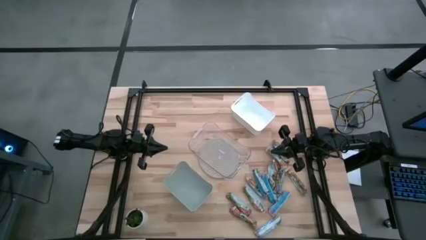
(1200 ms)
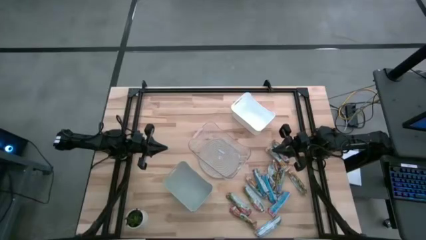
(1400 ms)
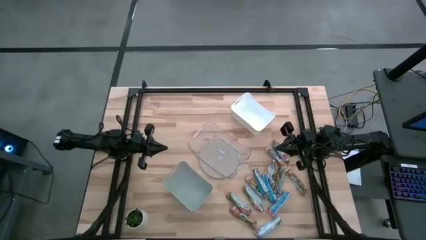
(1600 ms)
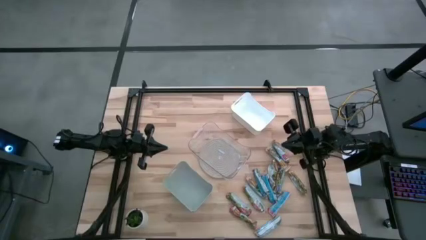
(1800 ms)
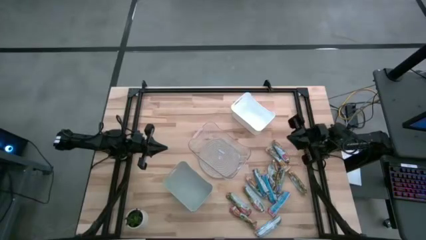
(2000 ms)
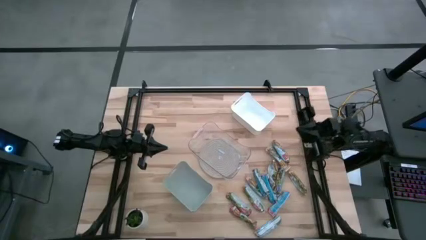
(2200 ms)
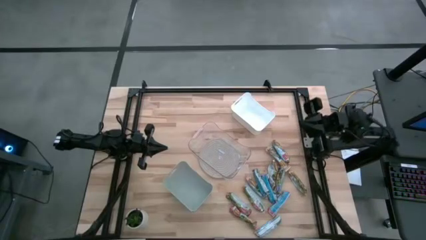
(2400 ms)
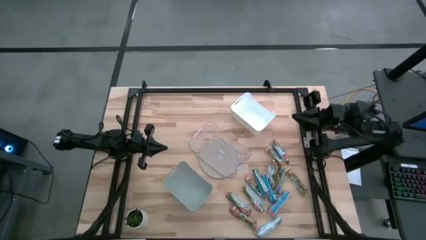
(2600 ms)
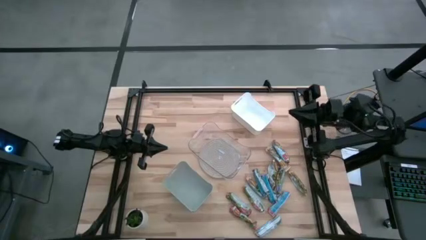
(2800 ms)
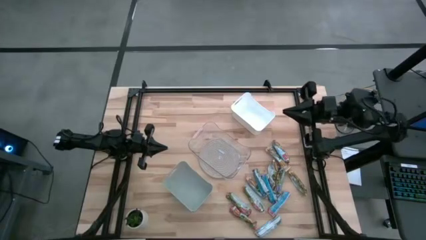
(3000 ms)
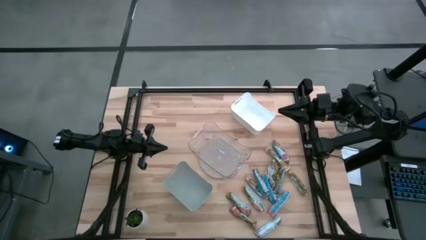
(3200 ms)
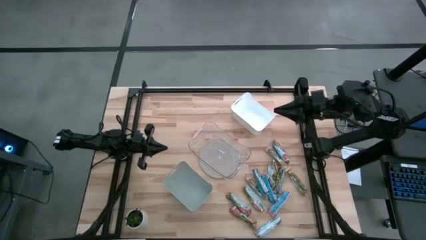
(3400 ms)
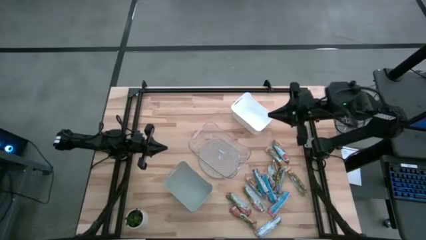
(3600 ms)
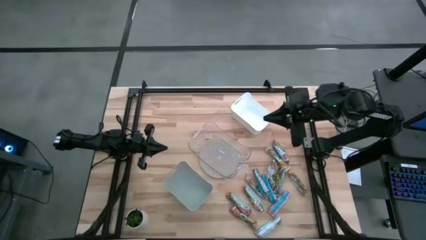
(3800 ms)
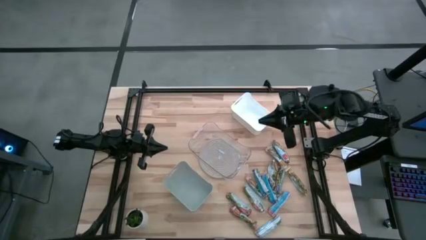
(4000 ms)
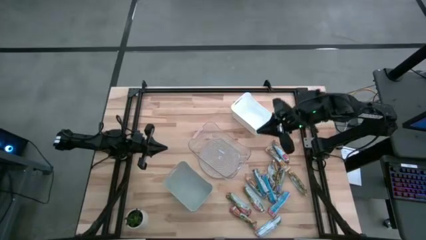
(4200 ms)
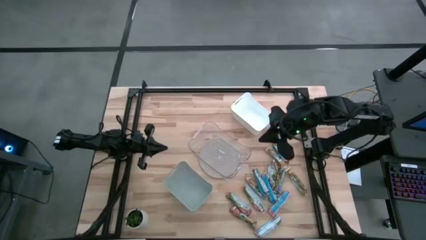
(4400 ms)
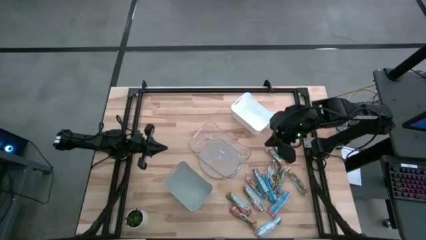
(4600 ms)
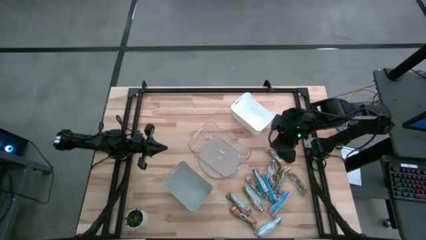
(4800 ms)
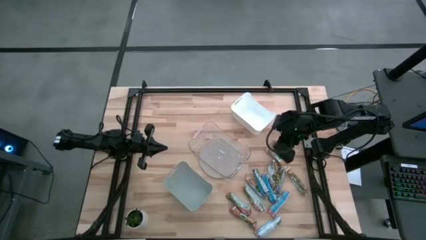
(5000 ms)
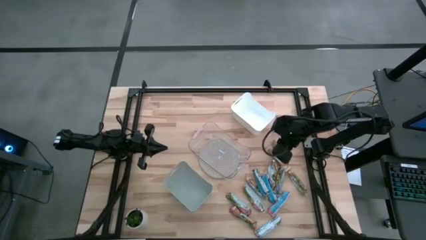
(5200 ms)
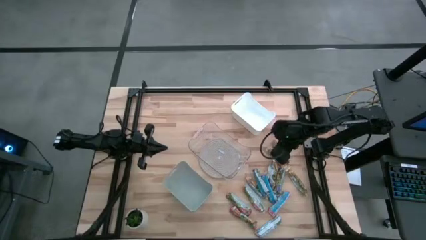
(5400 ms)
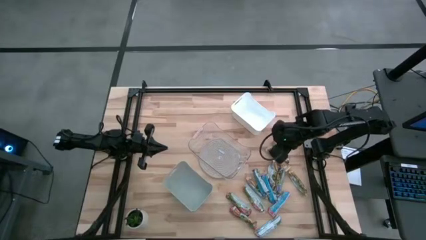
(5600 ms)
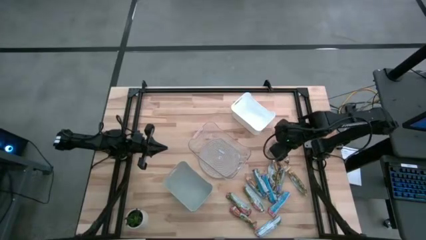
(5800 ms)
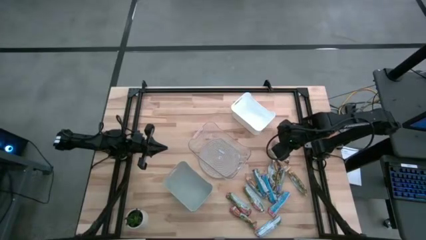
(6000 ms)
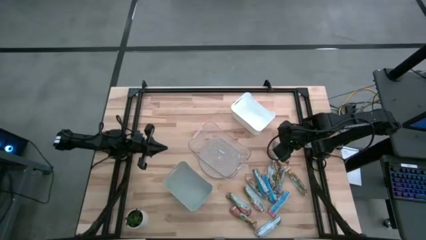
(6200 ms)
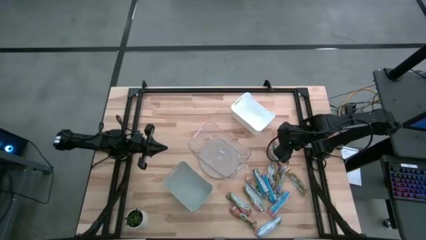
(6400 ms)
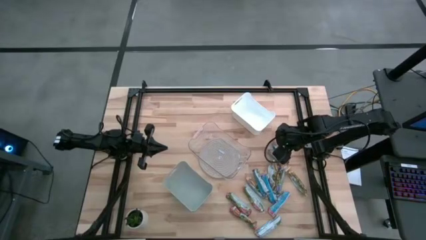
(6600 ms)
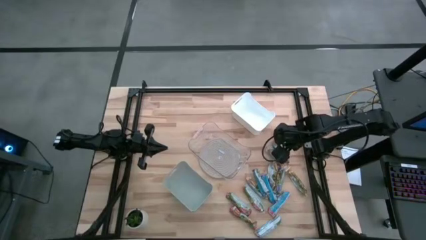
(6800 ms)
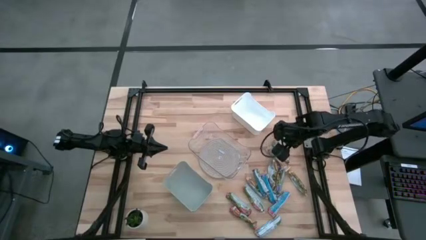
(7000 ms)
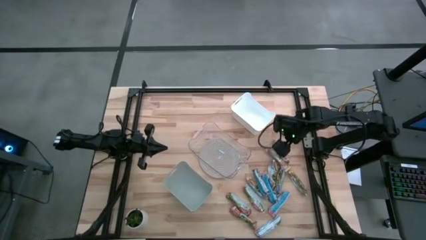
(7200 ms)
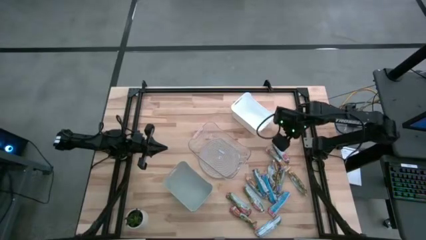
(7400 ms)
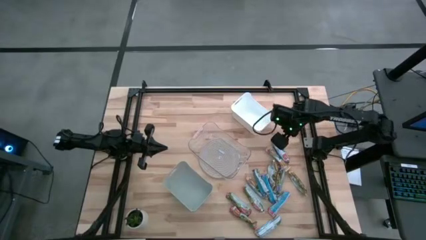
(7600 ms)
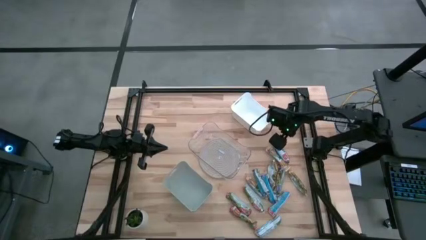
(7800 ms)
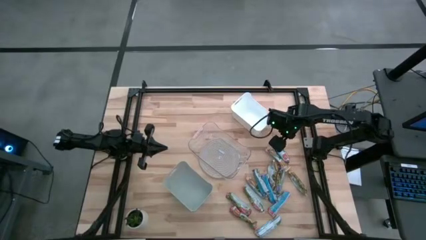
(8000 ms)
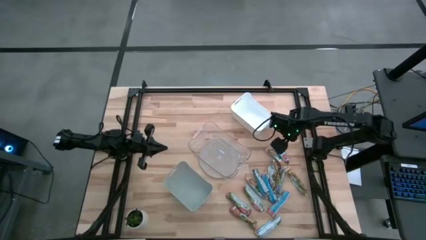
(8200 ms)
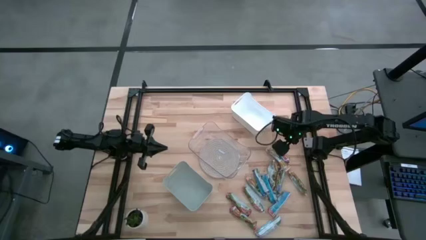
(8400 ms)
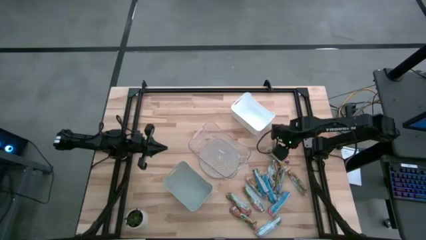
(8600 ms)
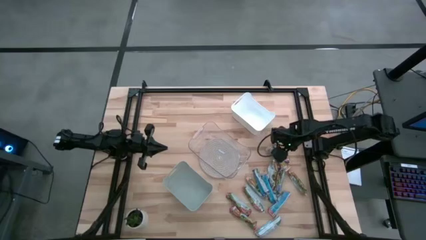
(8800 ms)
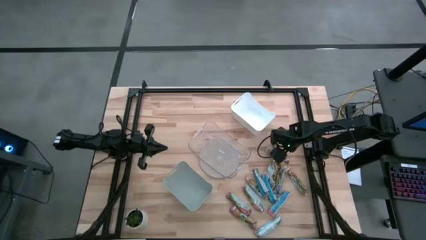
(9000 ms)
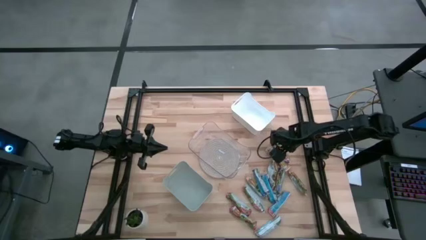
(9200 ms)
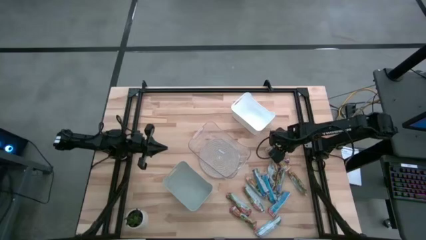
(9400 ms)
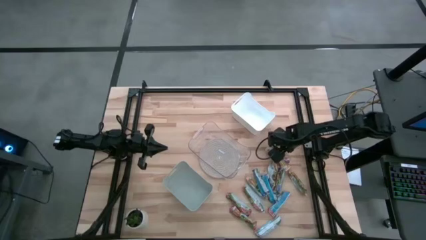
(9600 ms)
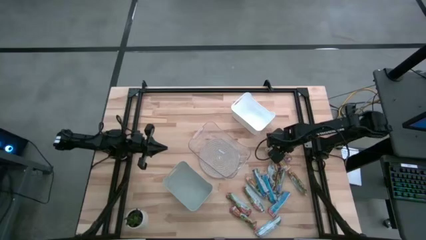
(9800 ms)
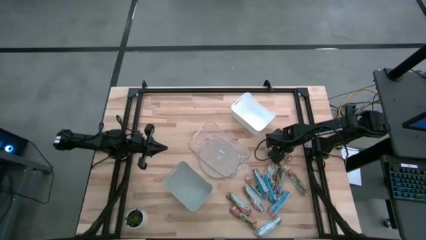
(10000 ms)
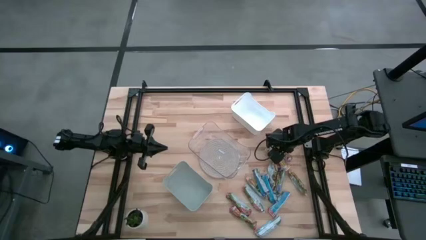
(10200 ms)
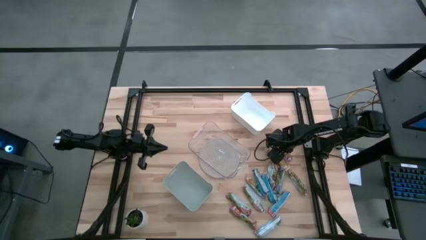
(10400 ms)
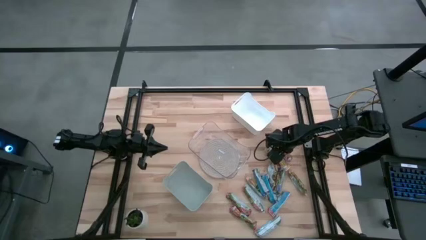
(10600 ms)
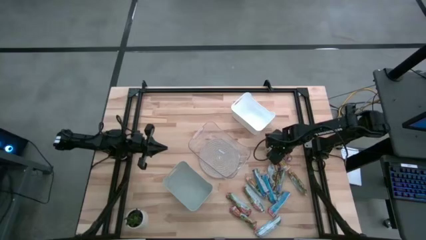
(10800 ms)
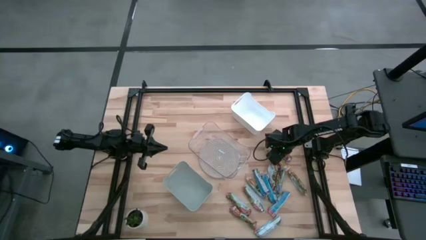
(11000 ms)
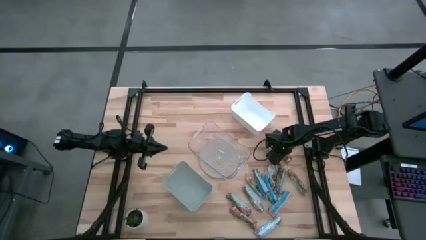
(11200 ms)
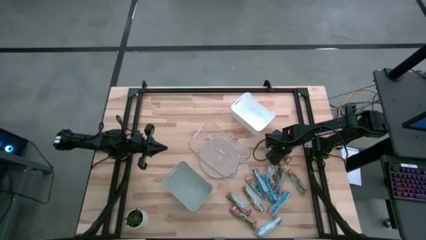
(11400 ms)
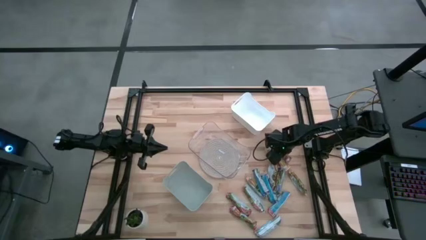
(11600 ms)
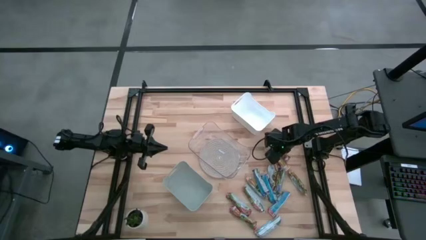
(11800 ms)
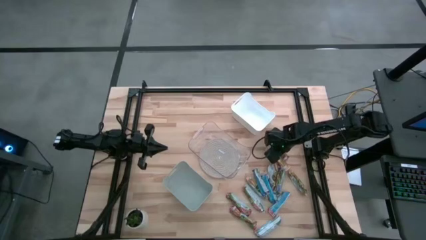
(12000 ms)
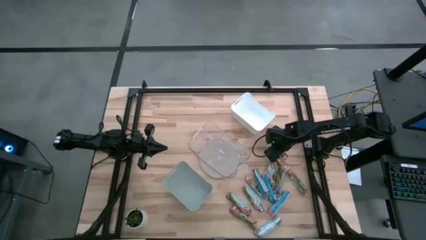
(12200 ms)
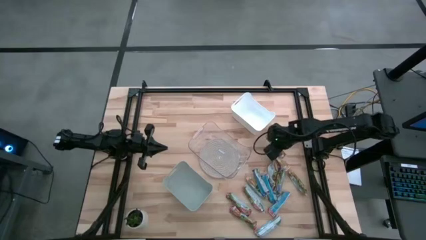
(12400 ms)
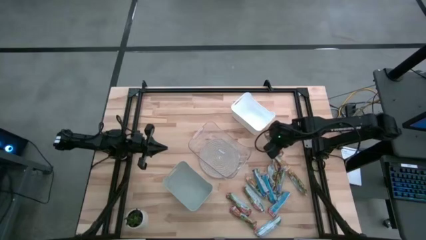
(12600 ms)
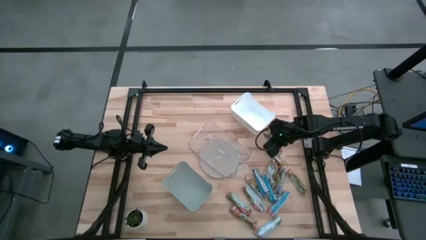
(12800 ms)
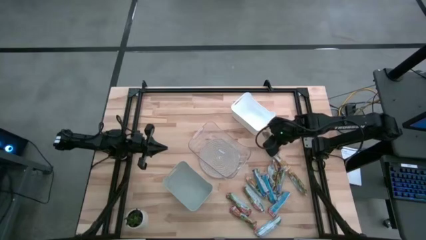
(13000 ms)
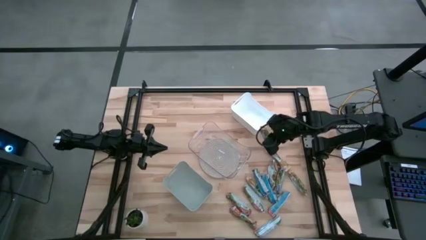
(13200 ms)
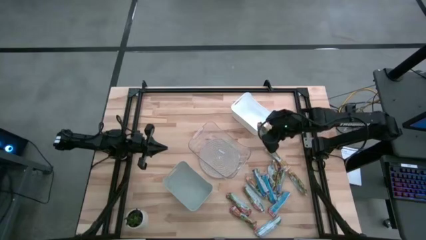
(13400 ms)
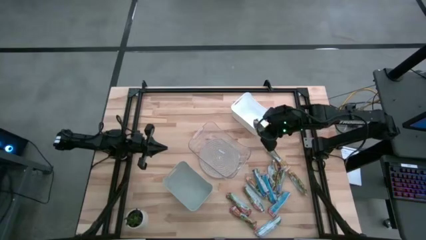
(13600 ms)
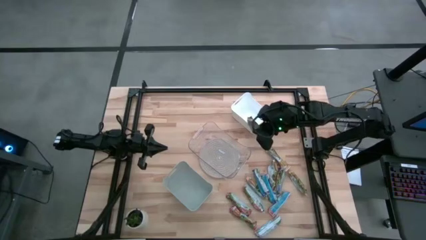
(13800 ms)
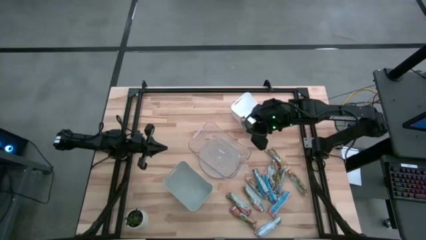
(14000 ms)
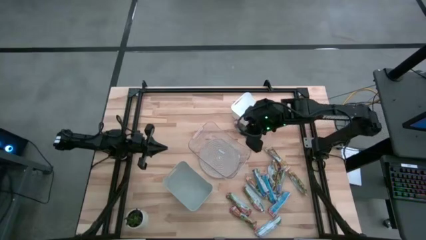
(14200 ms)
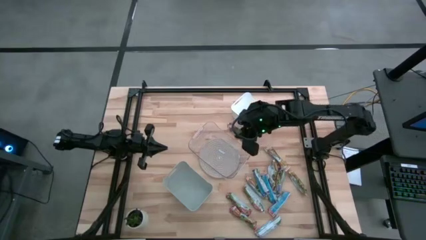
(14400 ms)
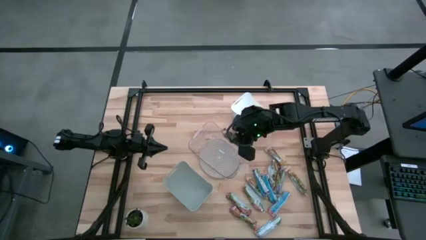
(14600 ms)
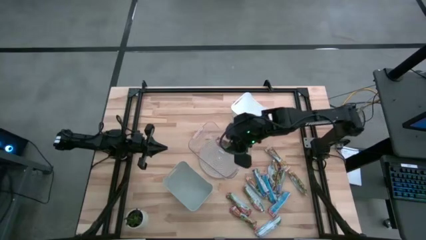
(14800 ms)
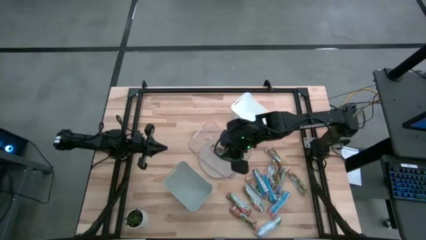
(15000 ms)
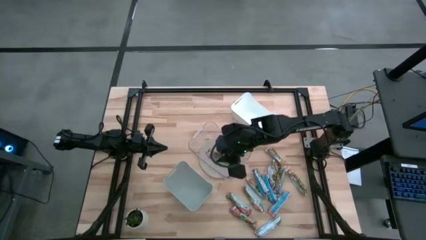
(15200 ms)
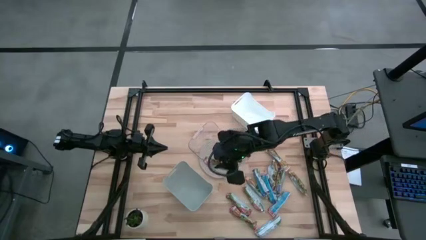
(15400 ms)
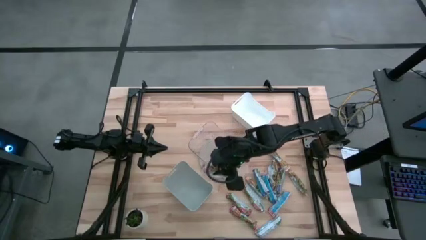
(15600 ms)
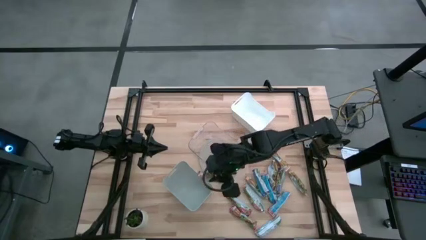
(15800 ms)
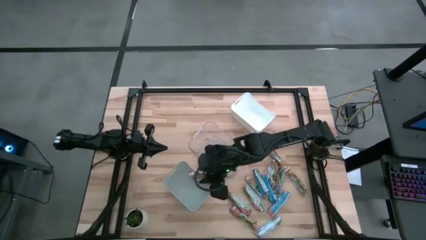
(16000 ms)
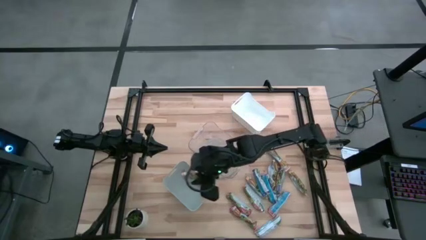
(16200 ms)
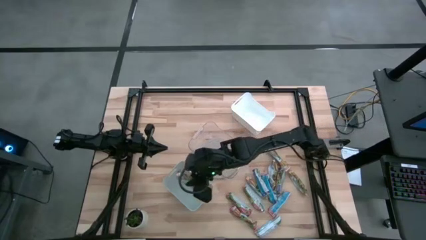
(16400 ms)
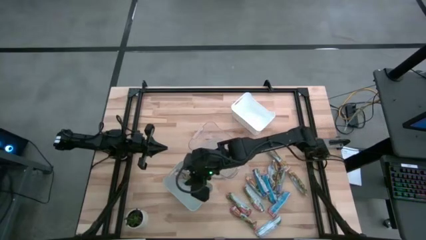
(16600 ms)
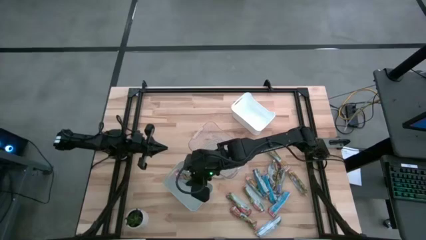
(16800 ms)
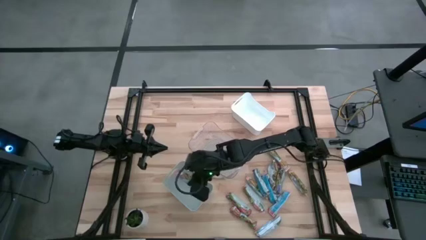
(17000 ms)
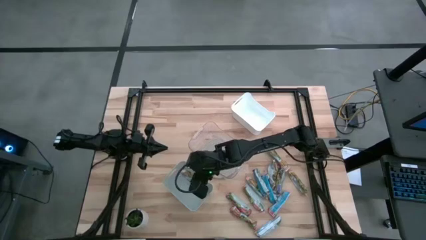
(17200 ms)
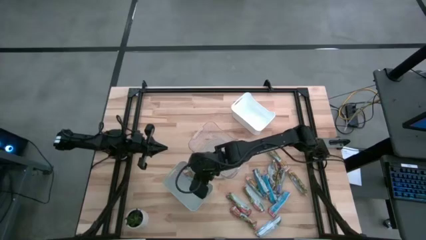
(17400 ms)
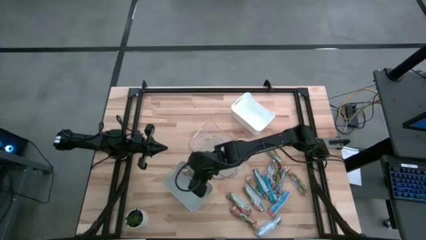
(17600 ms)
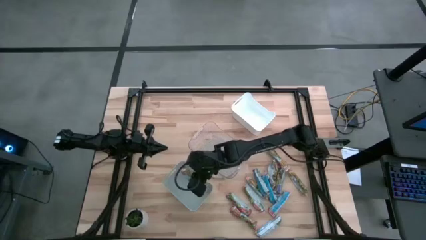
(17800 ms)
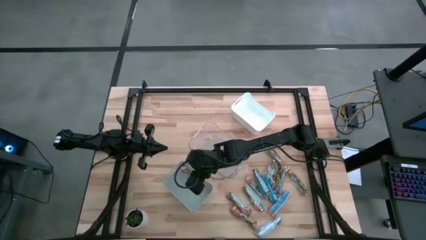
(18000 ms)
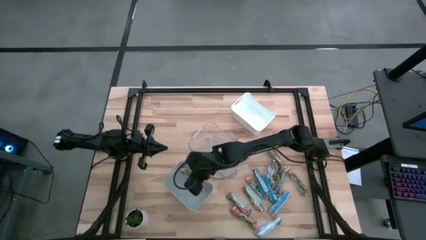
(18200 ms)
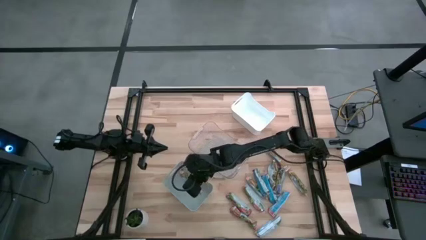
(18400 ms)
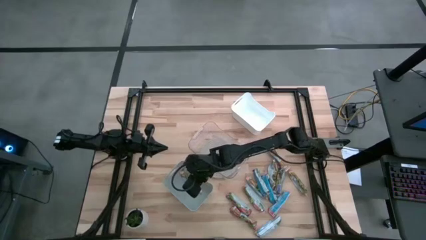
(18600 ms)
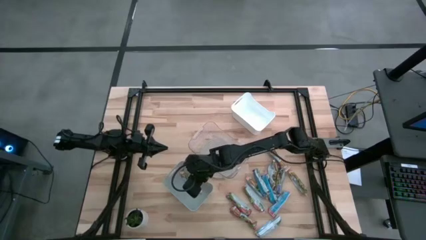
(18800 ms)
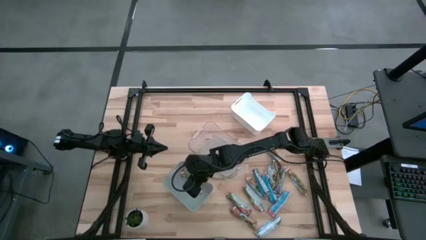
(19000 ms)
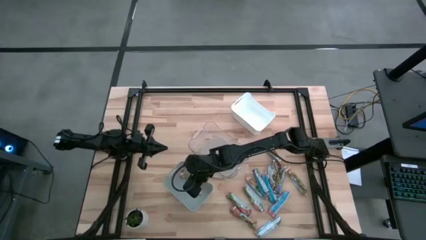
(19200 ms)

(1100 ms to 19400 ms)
Task: Pick and place Granola Bars by type
Put the red granola bar into the gray bin
